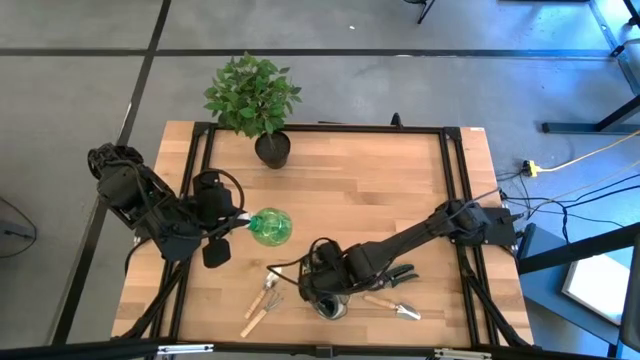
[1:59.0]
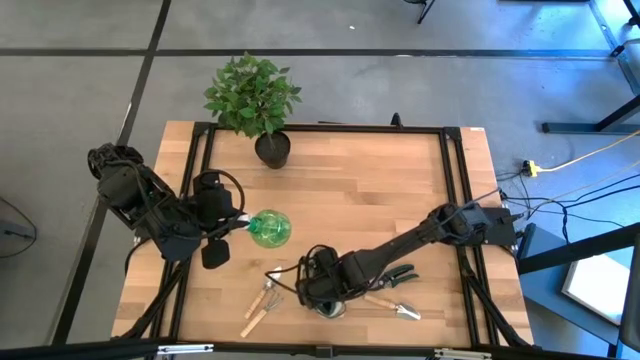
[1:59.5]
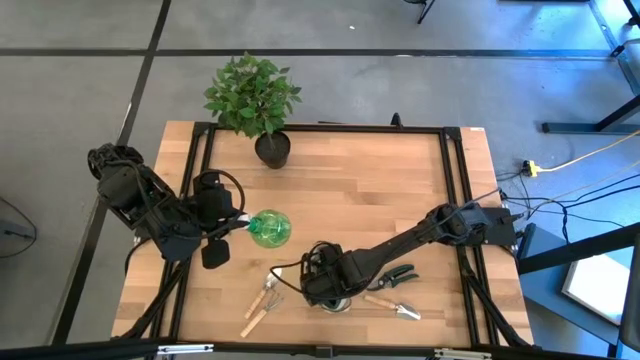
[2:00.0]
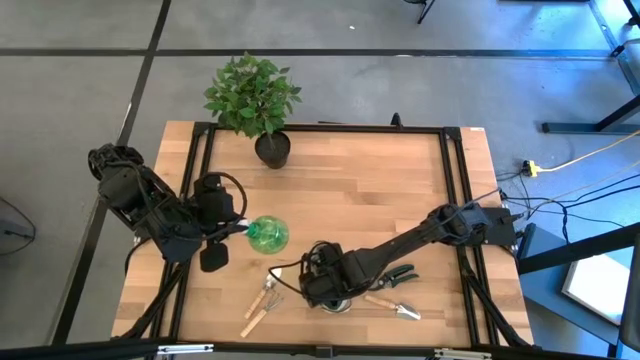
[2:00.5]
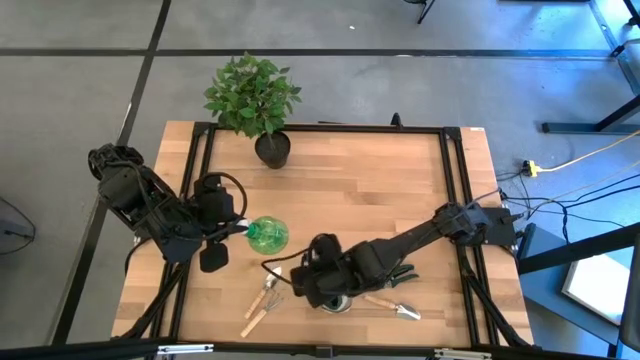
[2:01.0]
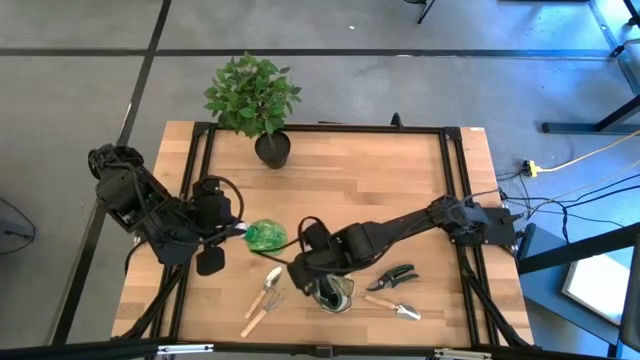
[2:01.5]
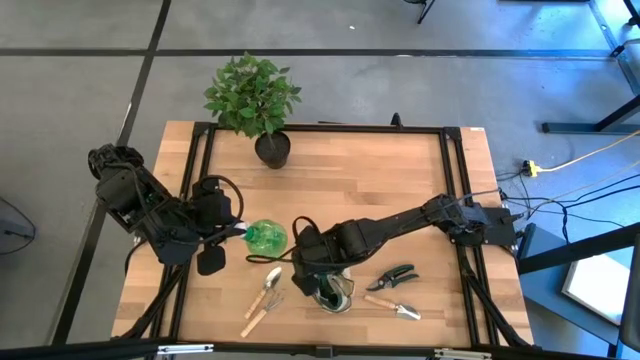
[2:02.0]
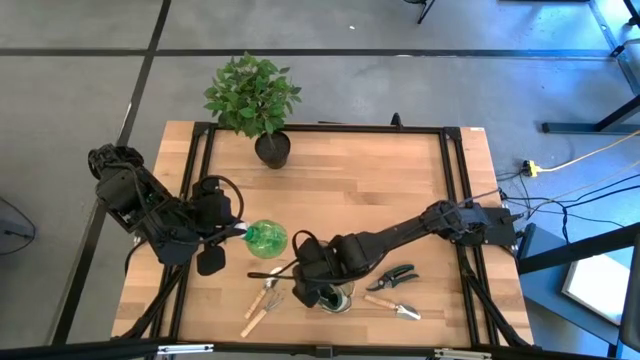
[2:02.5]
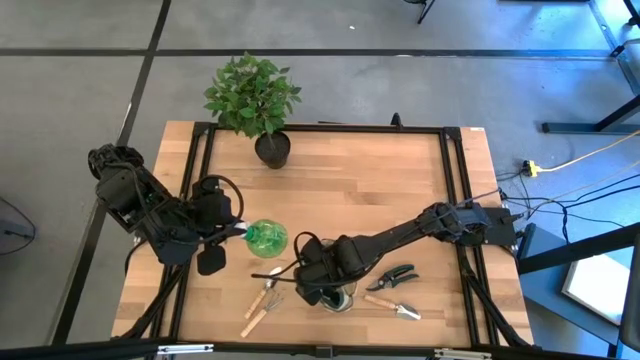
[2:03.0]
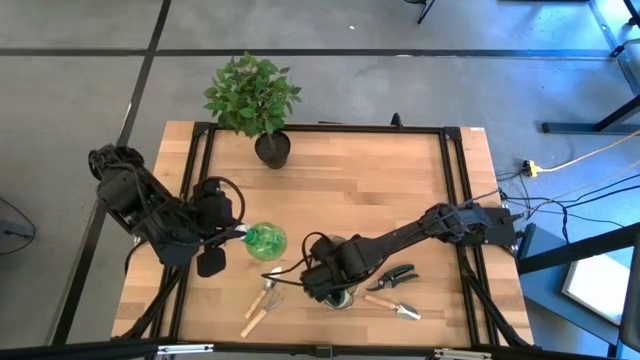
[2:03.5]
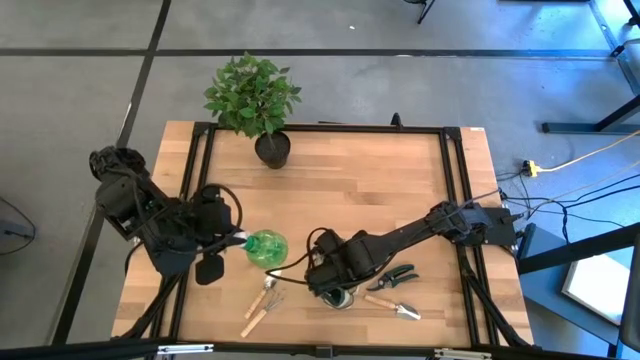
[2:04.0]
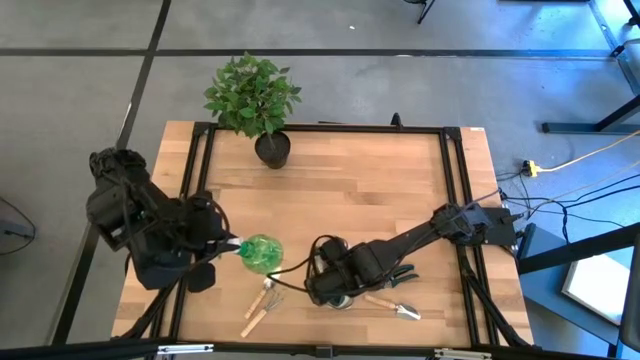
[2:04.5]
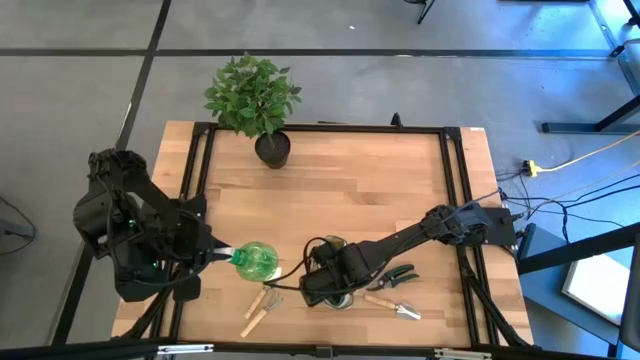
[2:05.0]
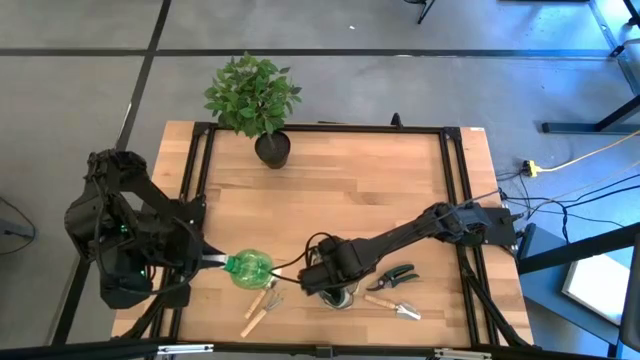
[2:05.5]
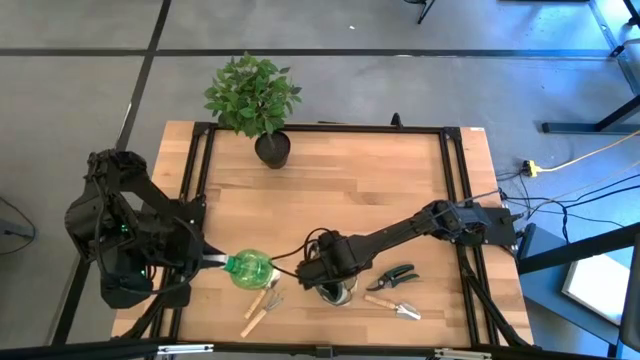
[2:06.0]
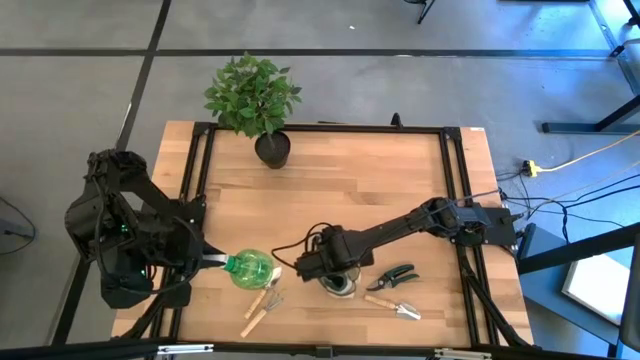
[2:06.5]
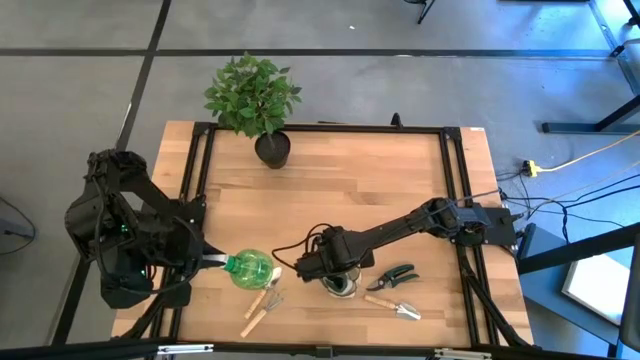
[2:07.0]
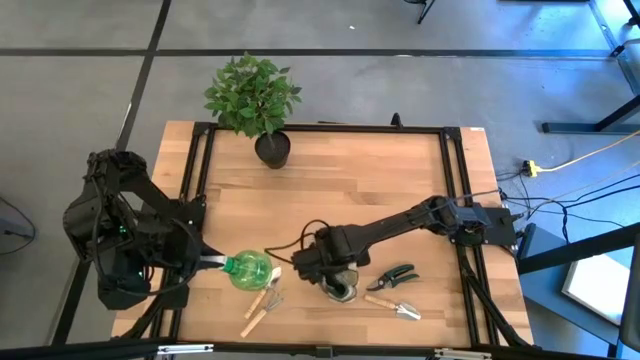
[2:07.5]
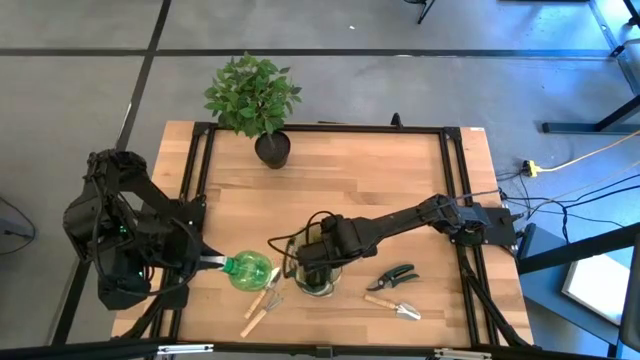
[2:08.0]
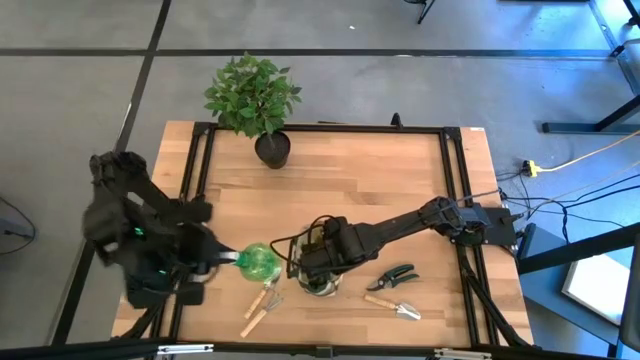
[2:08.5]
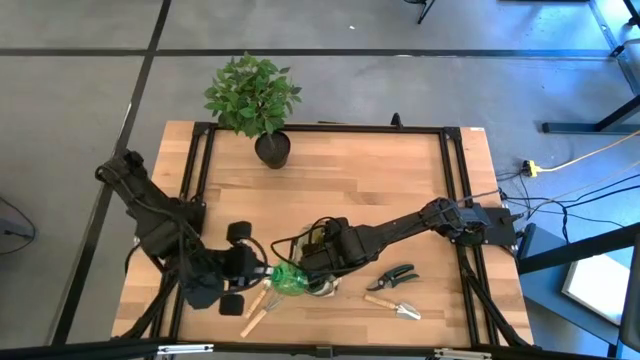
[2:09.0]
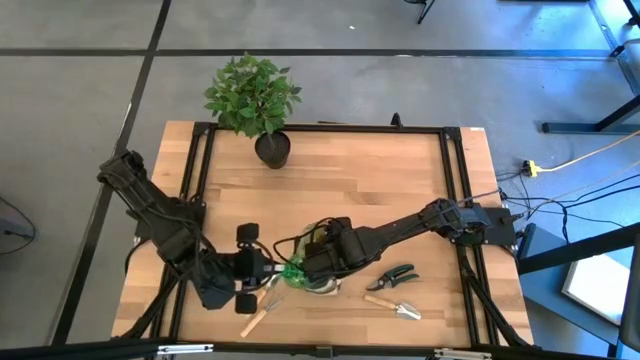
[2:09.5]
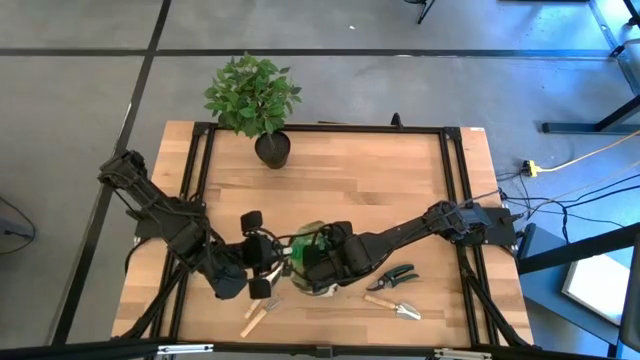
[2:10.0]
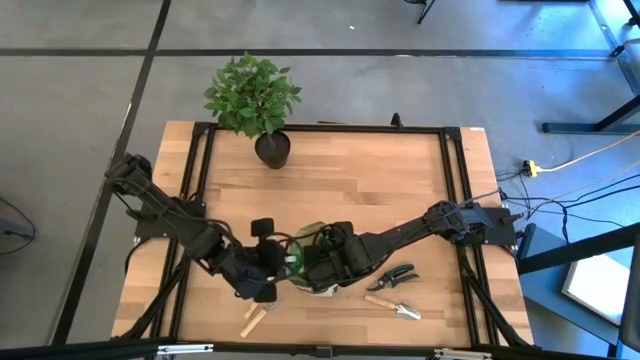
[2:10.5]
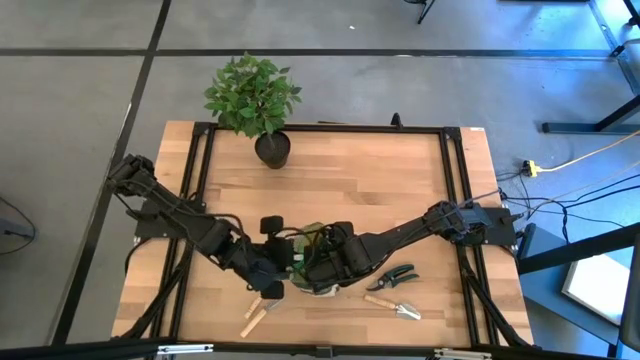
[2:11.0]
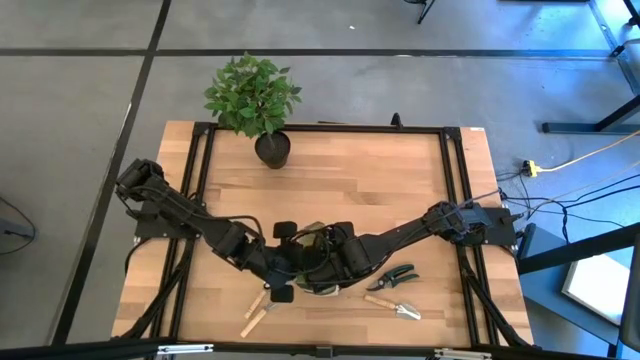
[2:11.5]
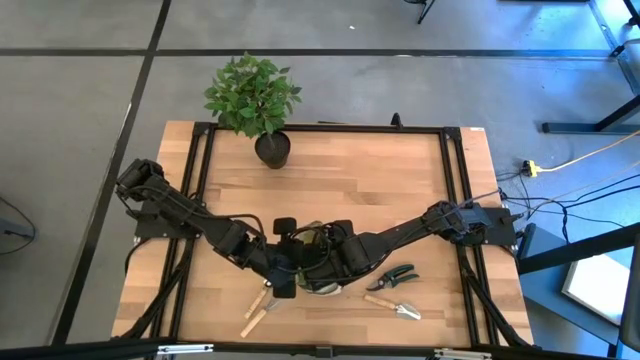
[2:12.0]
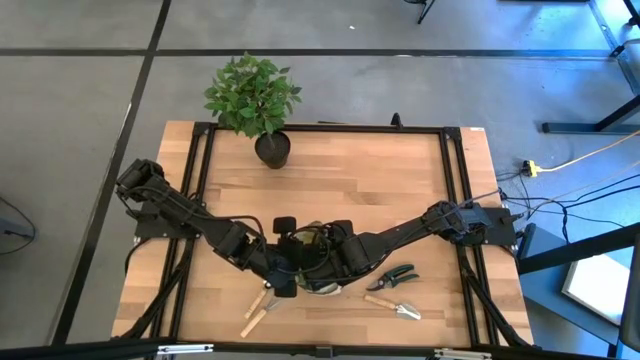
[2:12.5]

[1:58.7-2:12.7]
Task: Pick & Place Garden tools in Gardening bag
Put the green spray bottle into the brown gardening bag

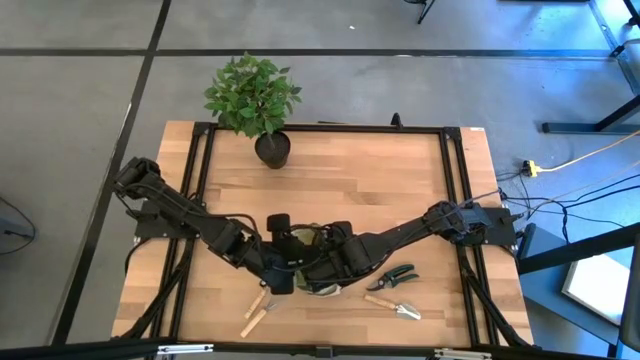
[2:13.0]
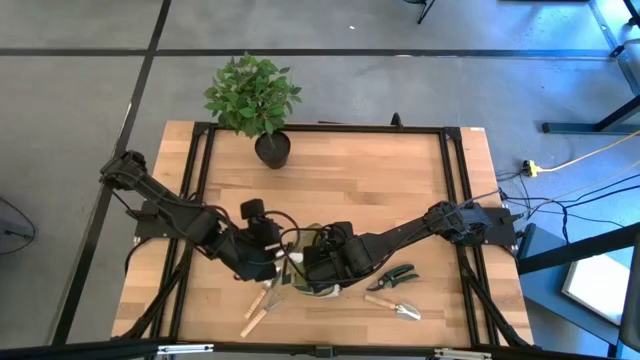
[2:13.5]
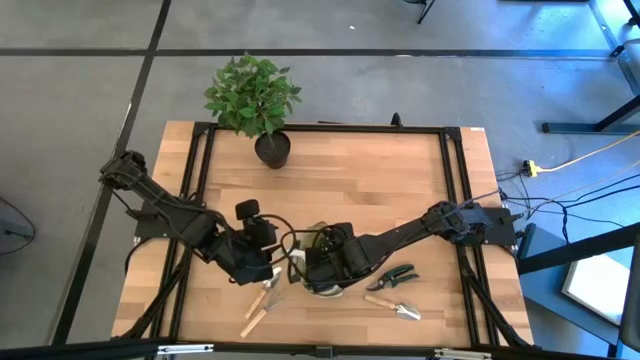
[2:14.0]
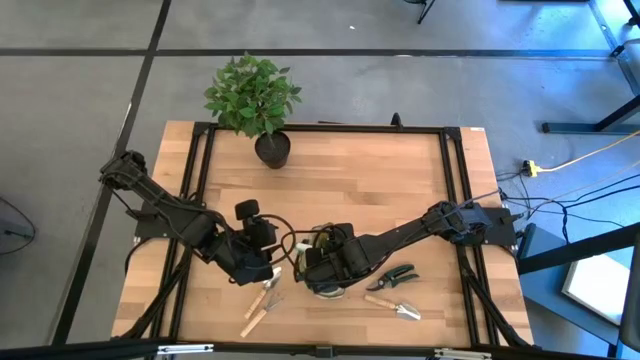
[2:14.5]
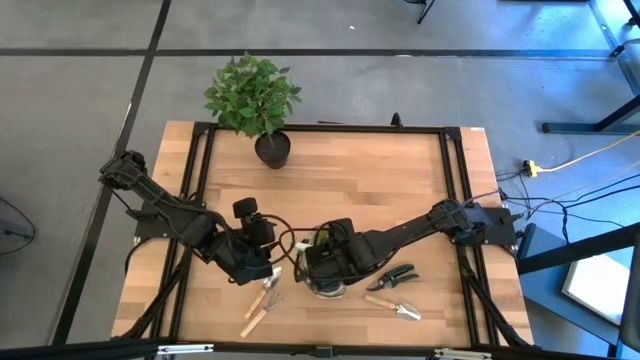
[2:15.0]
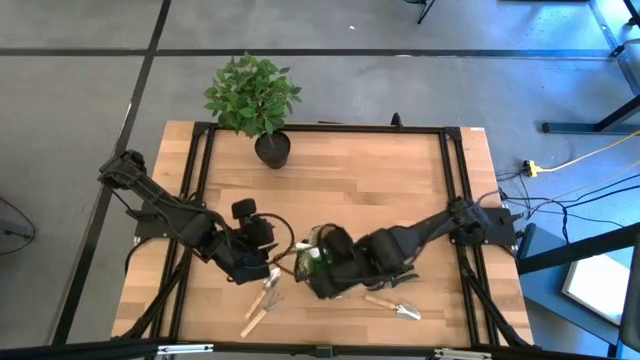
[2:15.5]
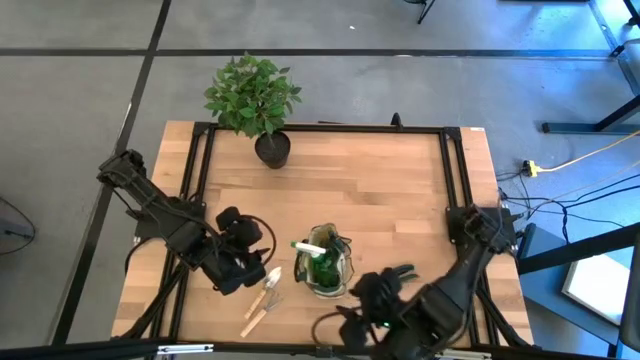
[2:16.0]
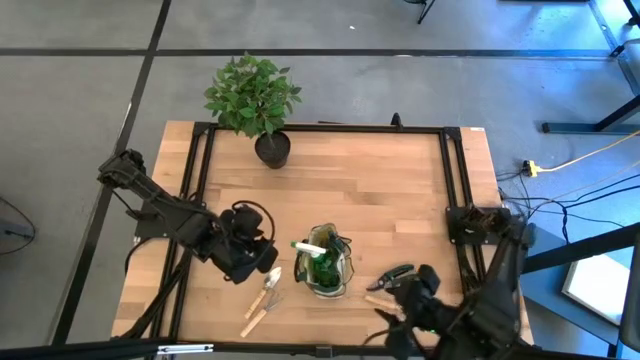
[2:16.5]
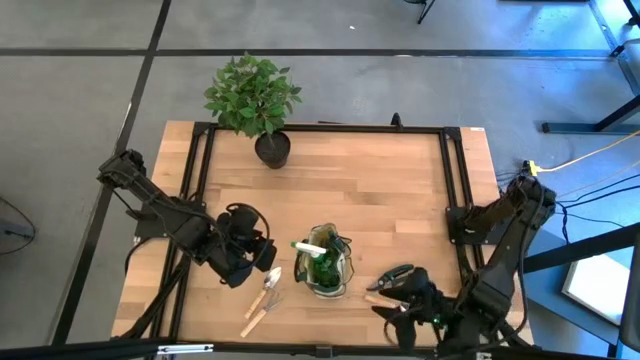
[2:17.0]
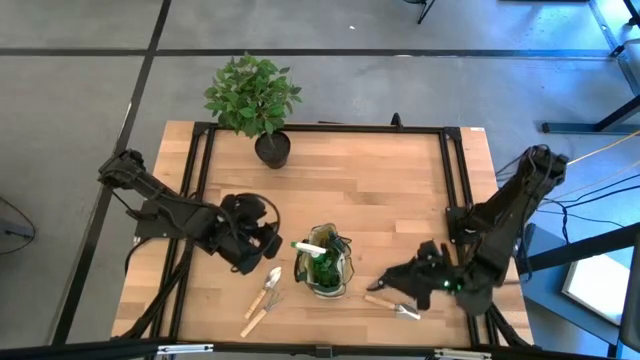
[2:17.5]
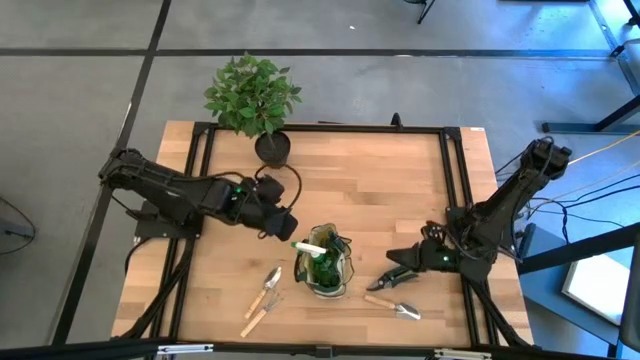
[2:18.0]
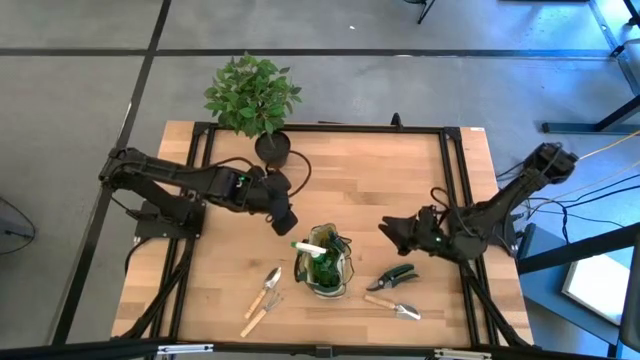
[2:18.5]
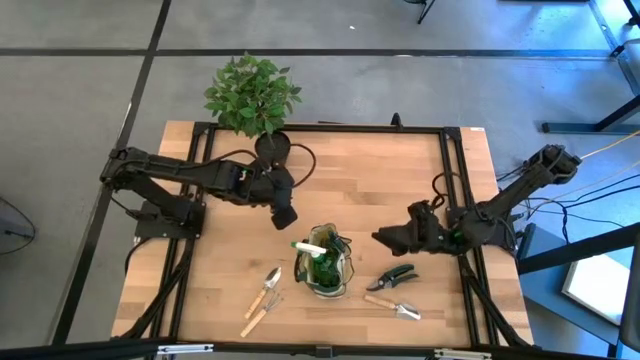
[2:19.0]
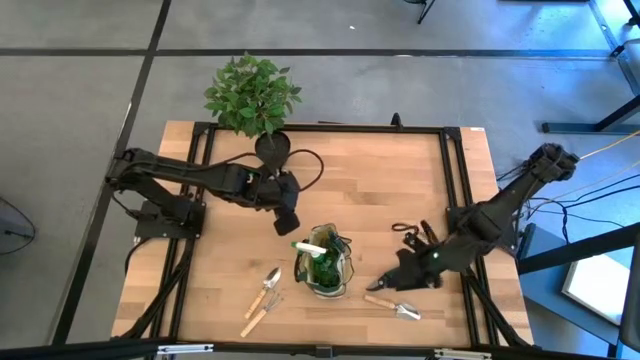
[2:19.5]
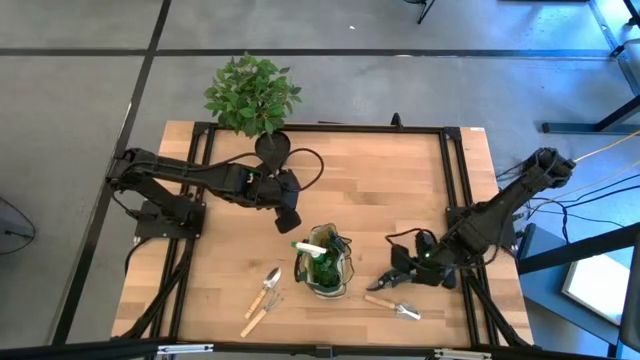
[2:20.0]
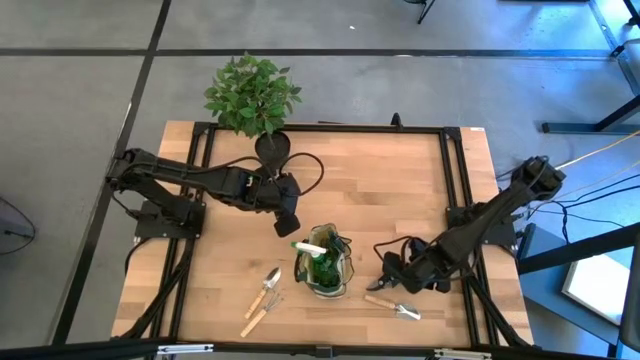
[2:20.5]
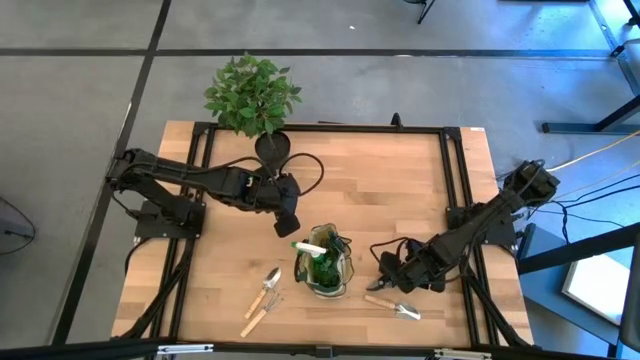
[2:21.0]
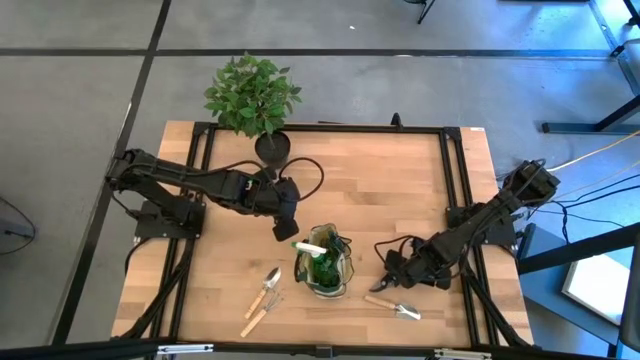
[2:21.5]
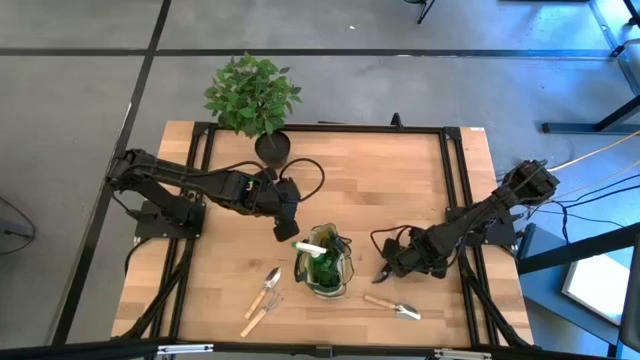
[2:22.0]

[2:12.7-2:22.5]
Put the green shear scissors into the brown gardening bag
